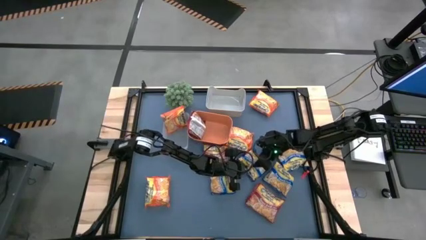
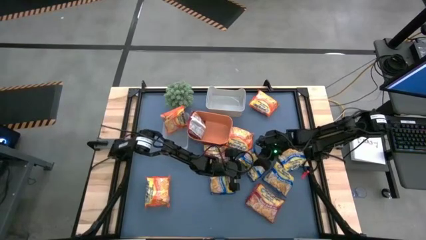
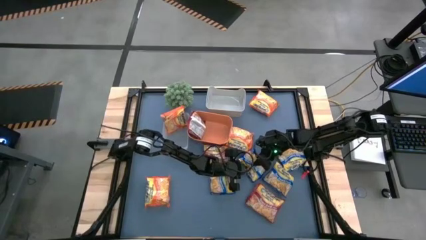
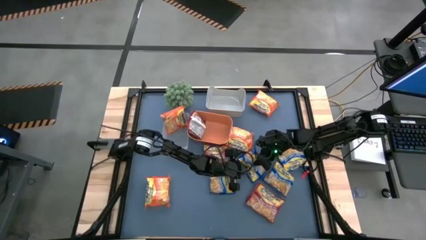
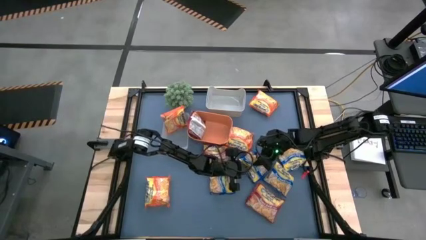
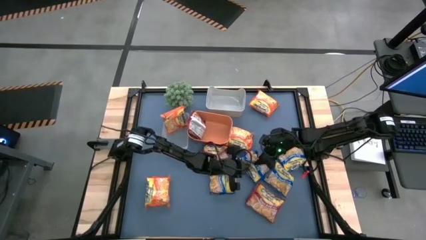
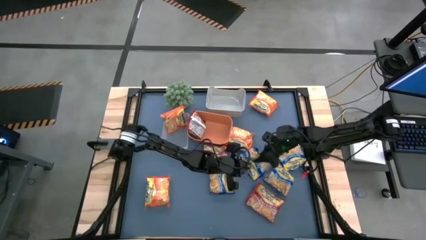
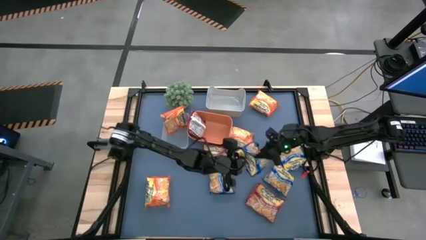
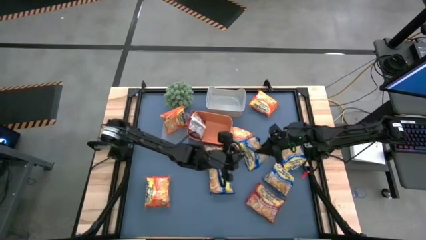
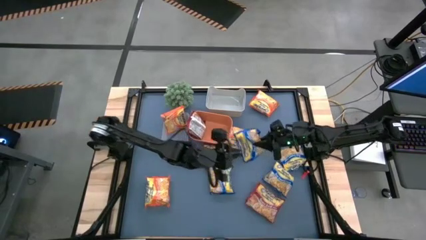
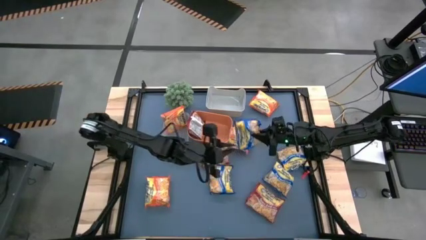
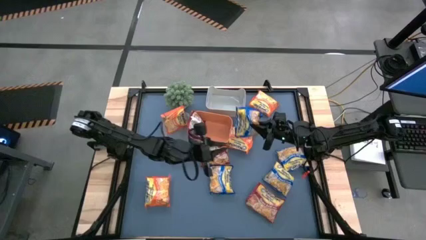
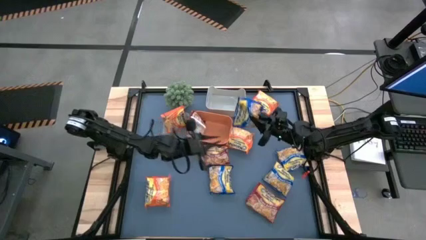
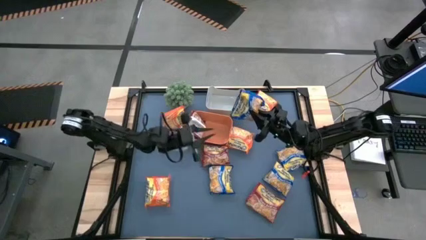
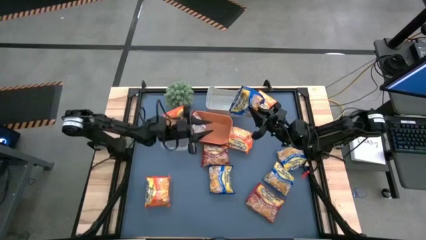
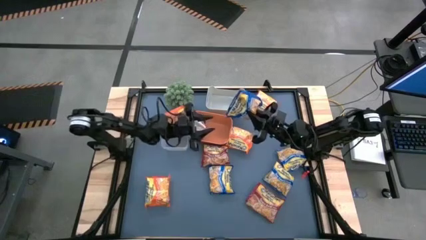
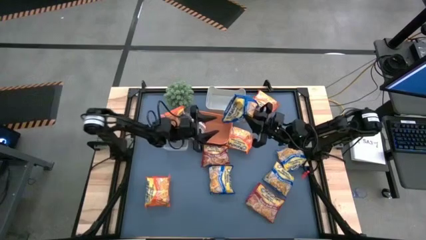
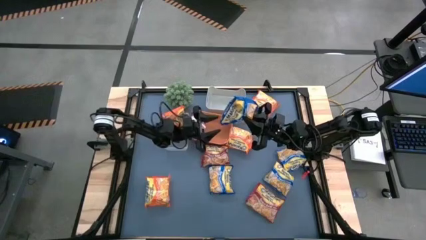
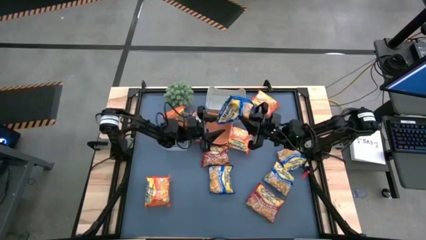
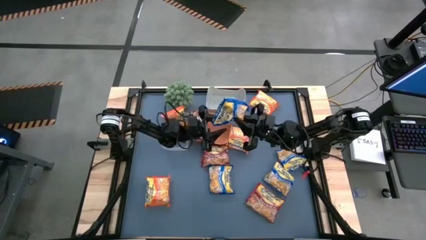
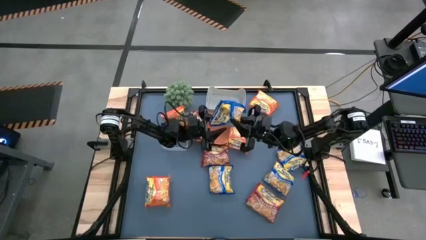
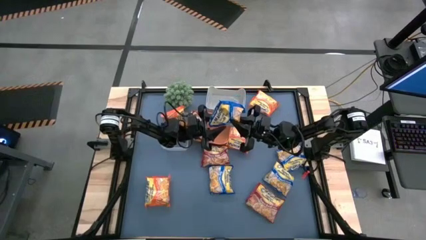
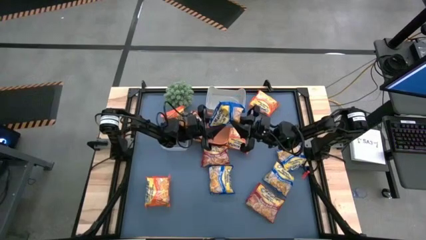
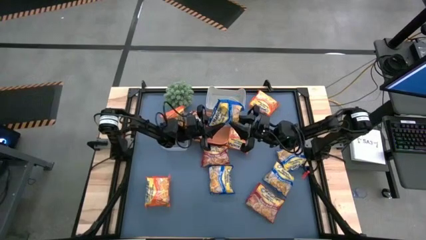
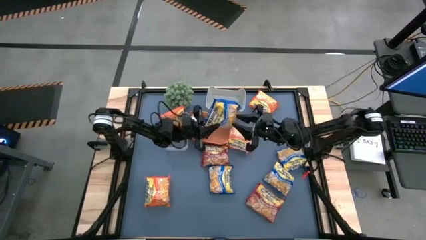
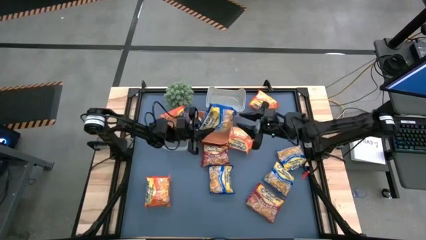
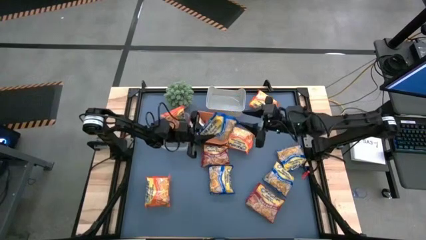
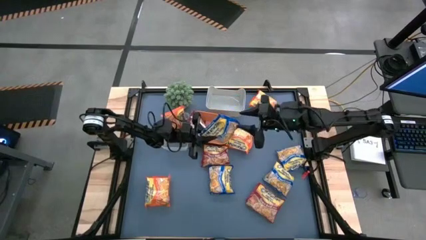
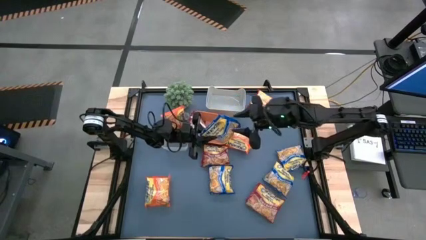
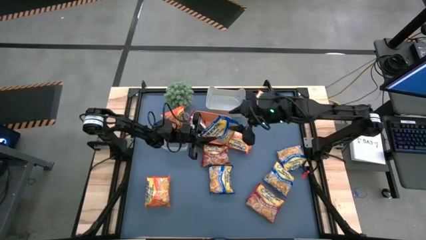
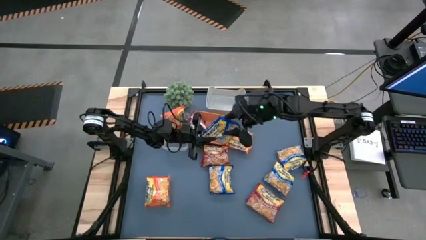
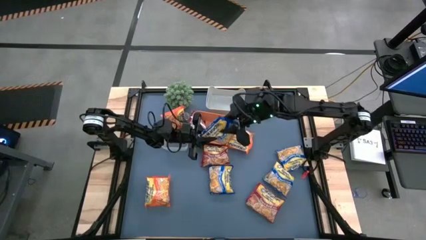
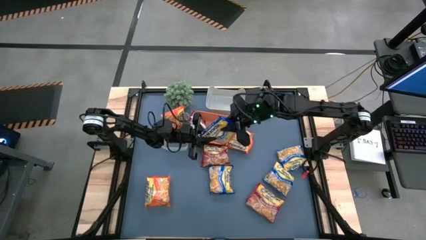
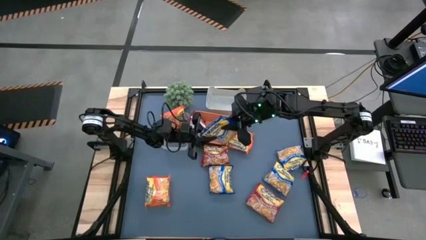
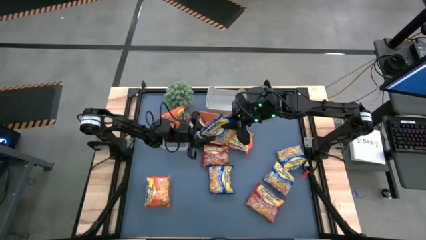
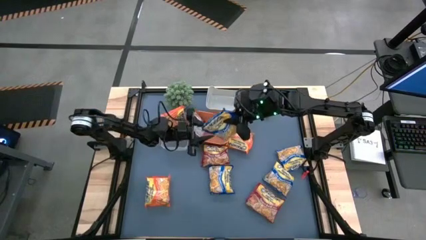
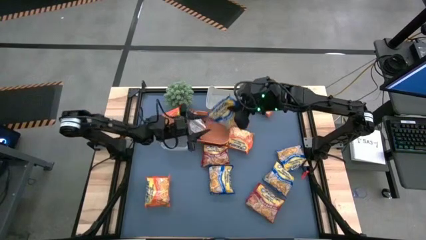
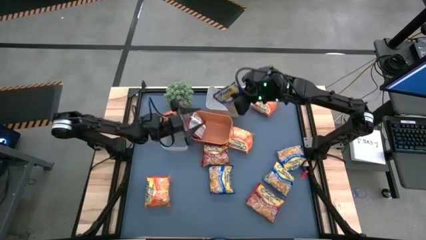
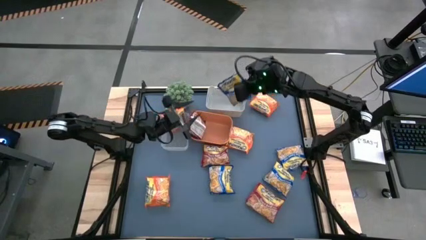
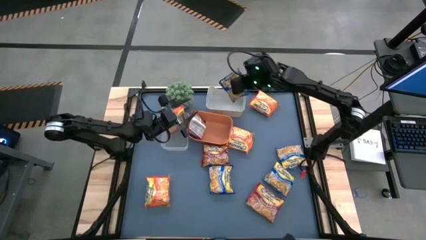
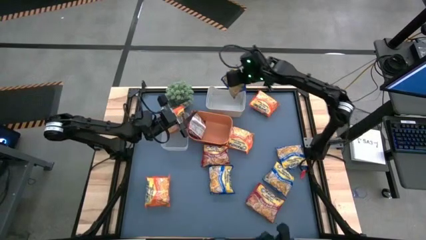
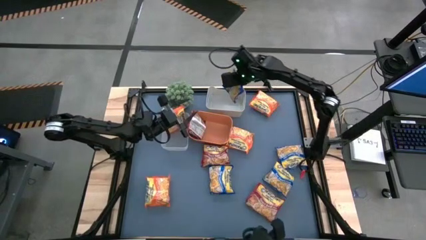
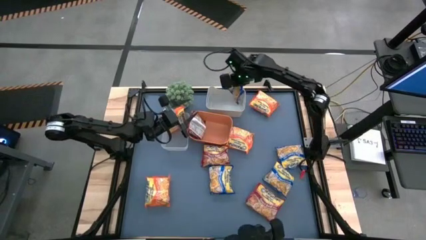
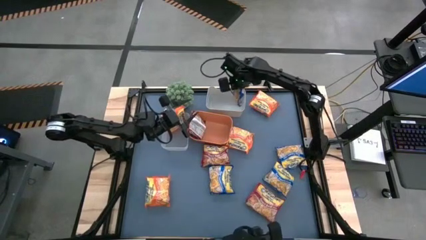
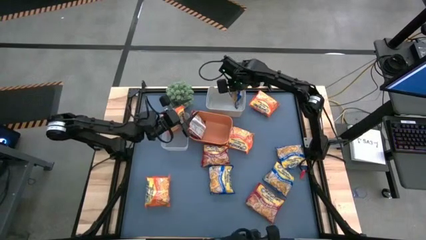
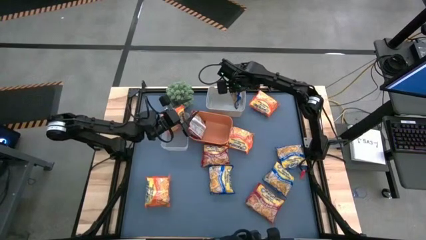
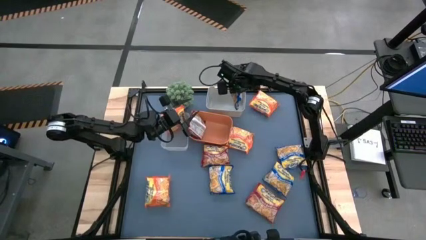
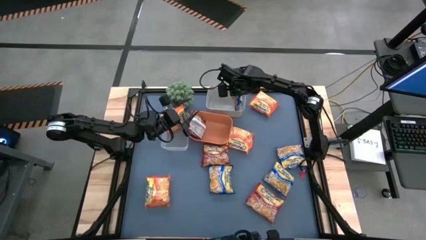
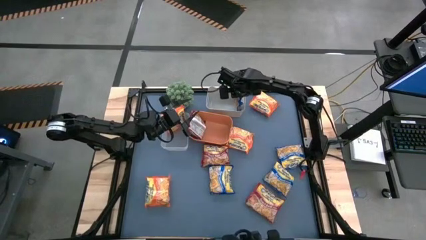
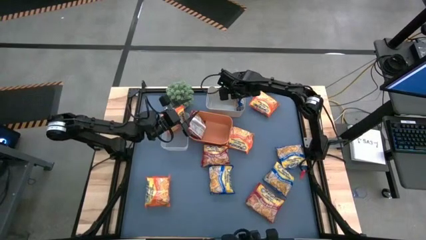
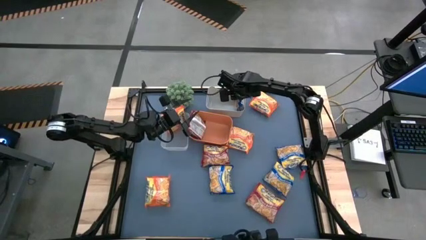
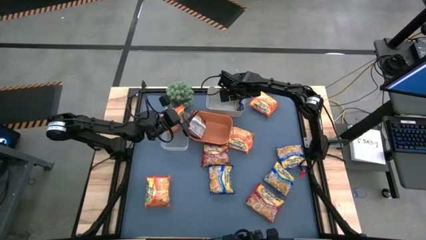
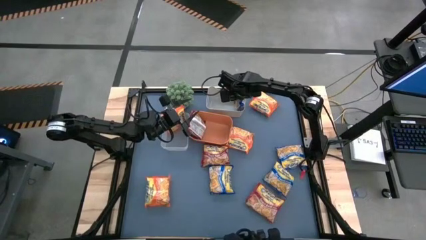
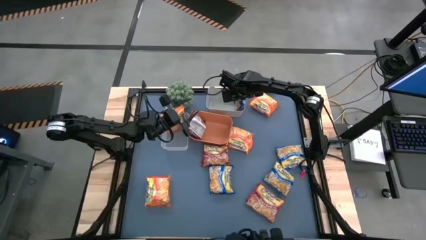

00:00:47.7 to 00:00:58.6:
Task: Sort Maruchan noodles
Put the blue noodle pack into the gray bin

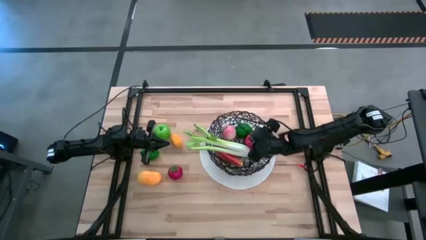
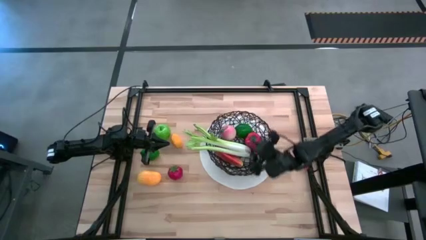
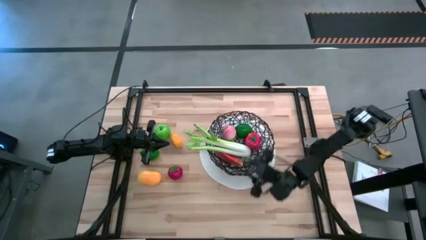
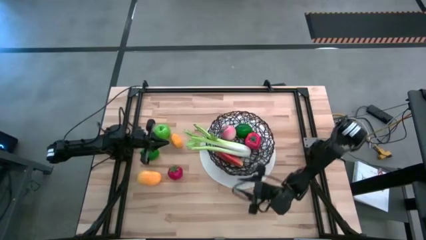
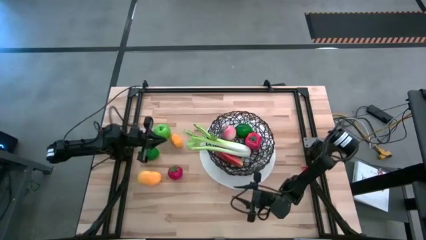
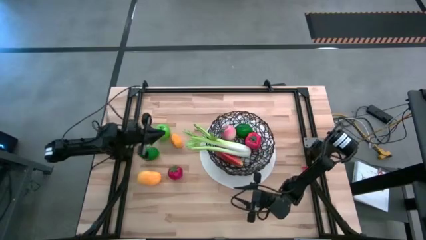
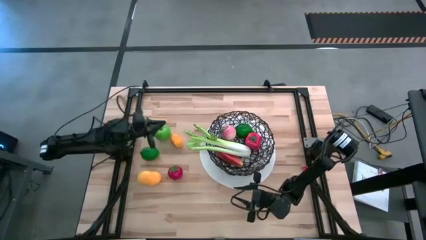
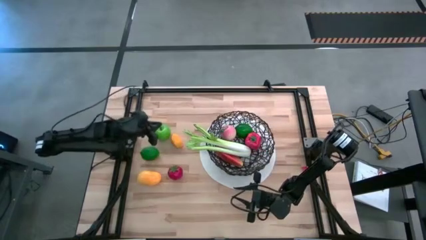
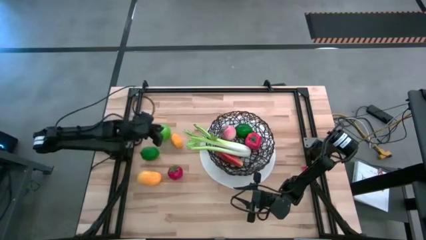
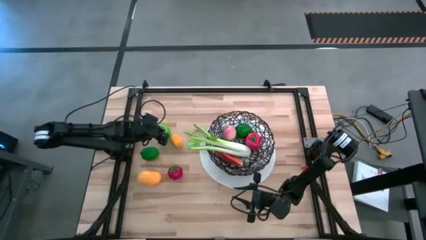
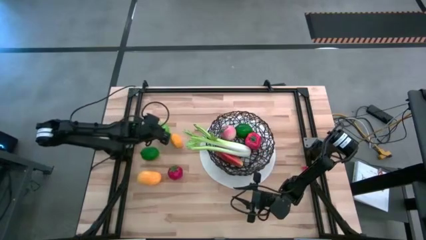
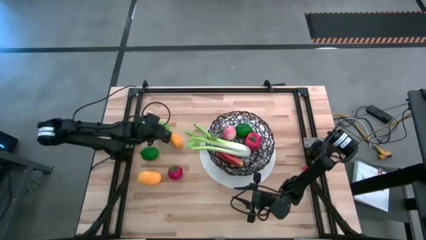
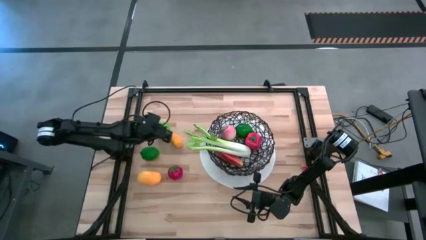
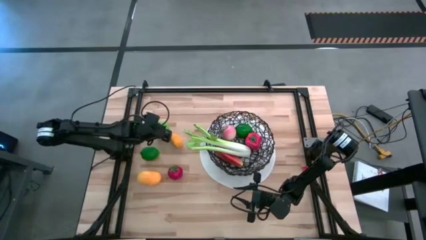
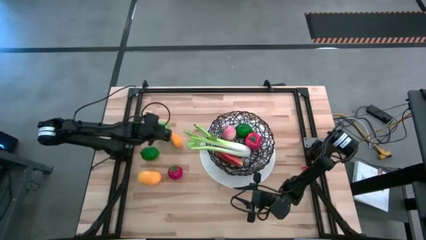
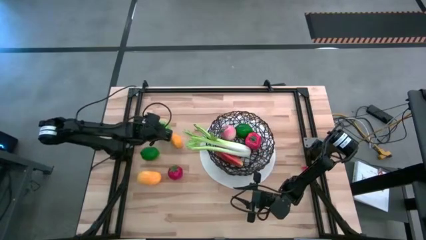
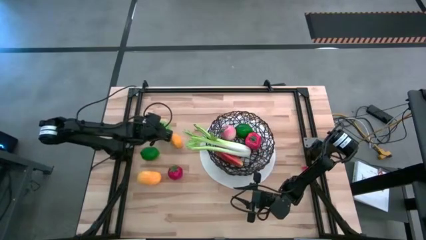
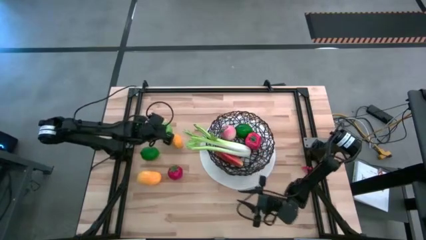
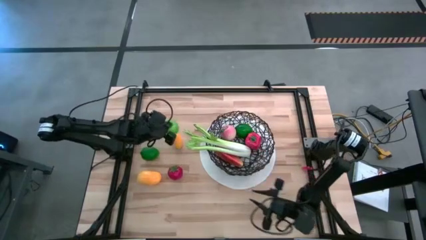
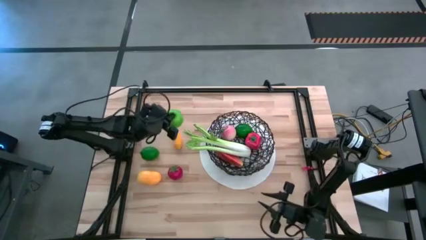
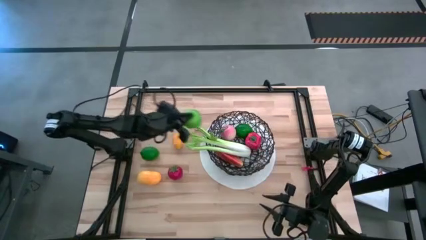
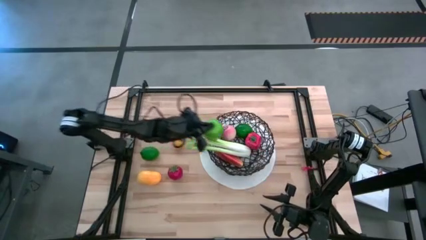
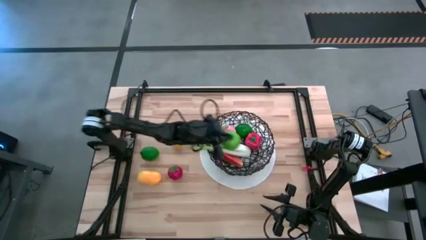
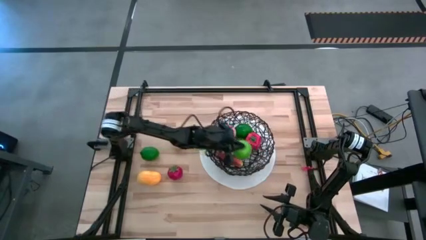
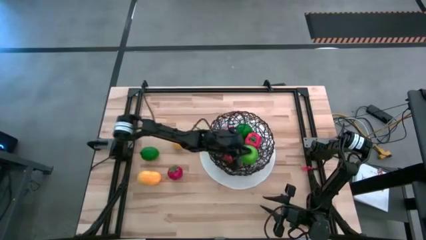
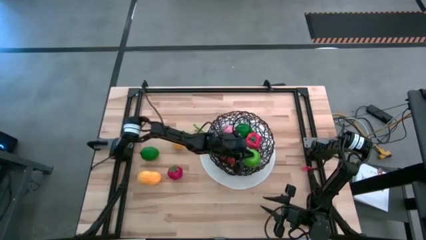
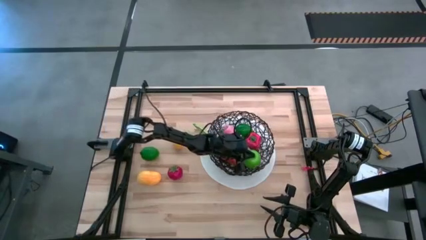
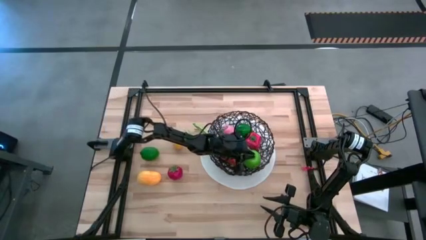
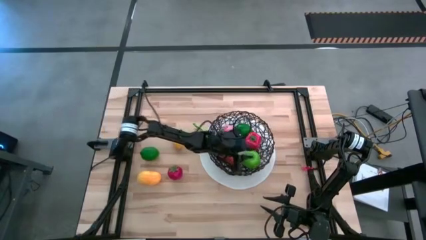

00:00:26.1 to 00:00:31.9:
Task: Build produce basket
Put the green apple into the wire basket

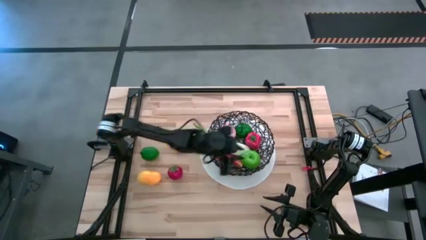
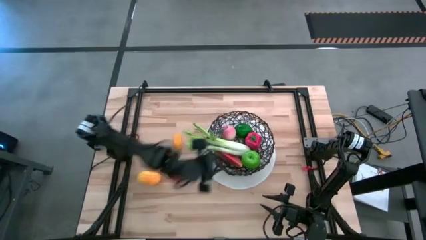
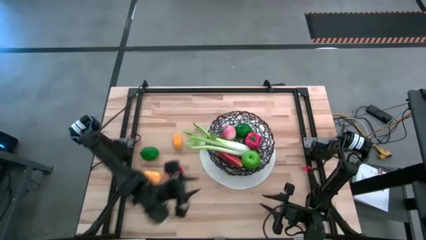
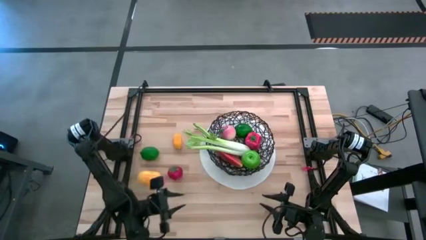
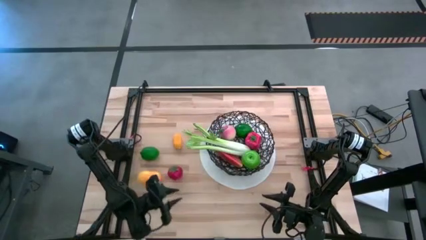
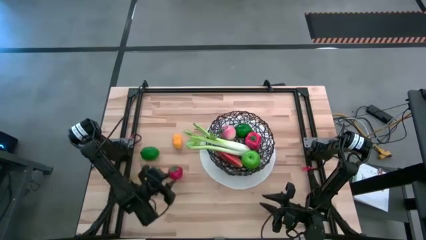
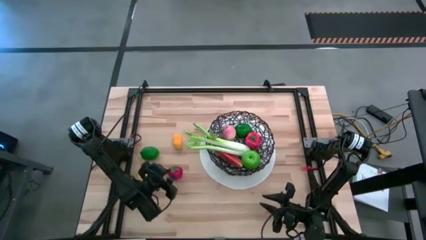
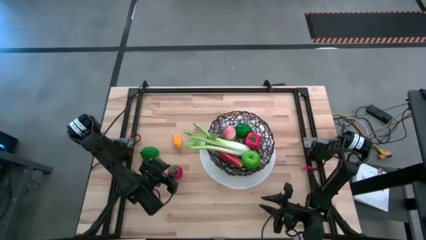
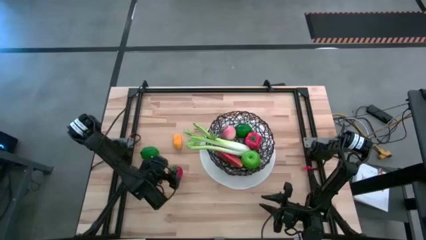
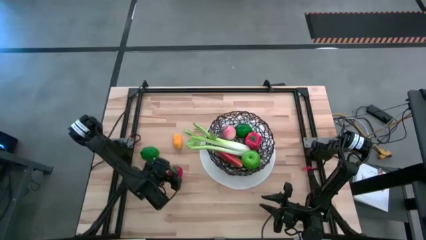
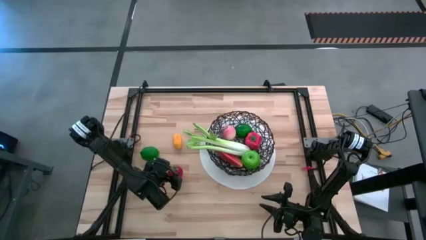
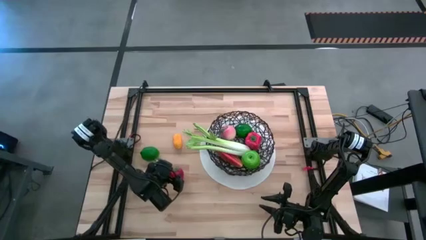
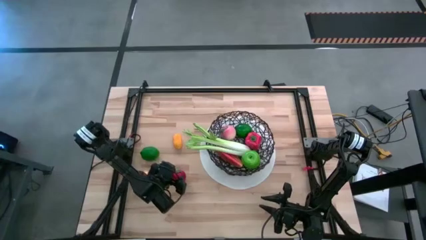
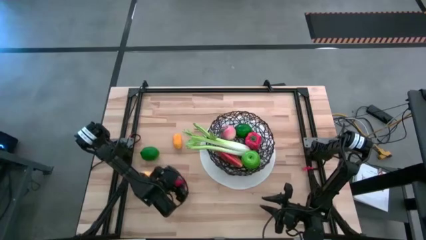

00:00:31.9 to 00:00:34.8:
Put the red tomato into the wire basket
